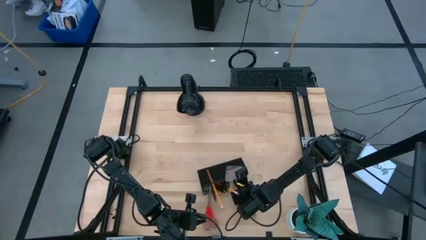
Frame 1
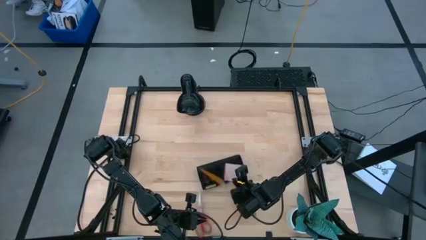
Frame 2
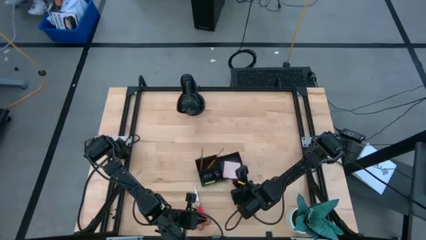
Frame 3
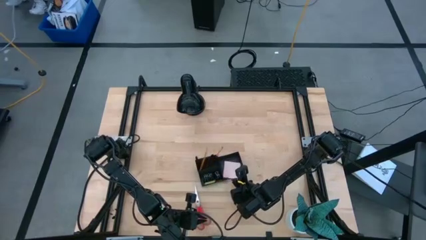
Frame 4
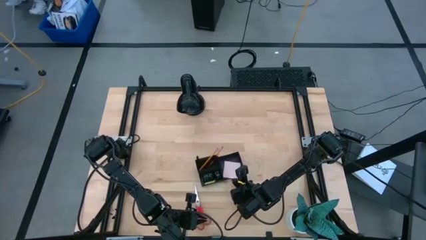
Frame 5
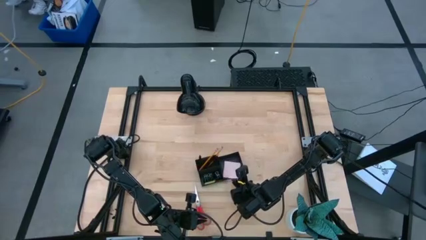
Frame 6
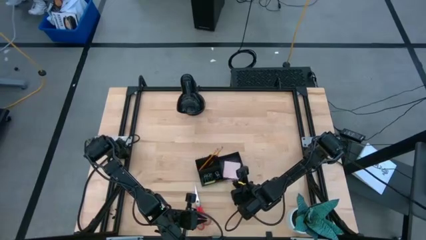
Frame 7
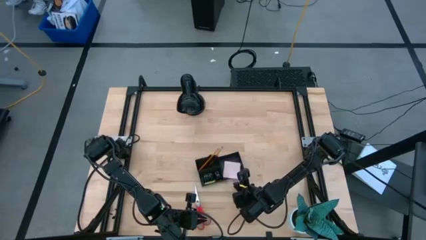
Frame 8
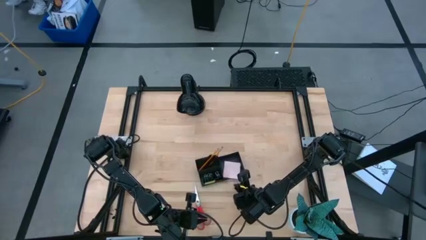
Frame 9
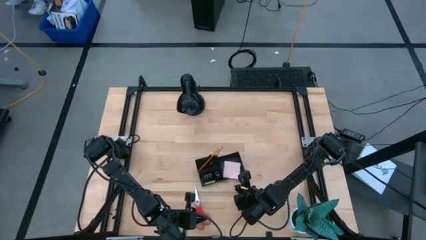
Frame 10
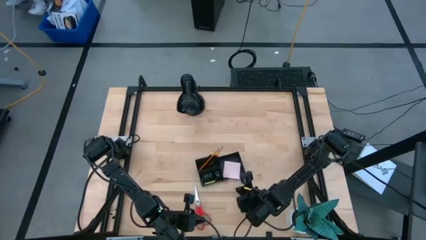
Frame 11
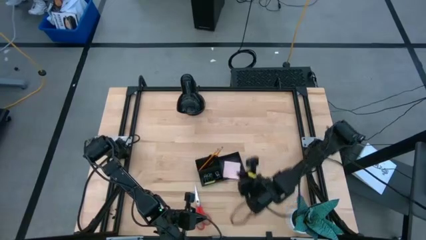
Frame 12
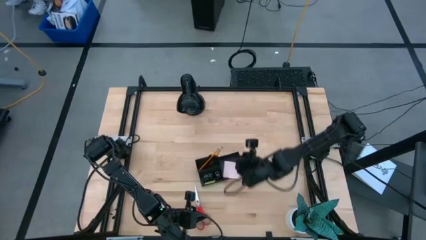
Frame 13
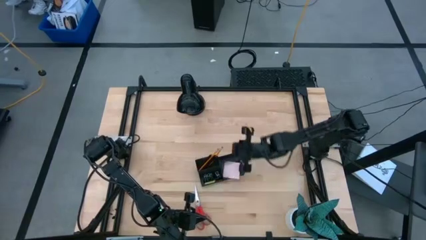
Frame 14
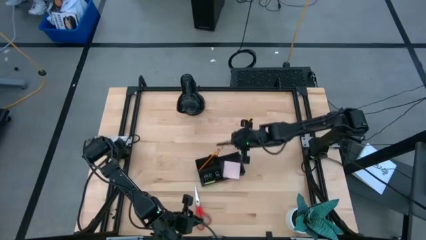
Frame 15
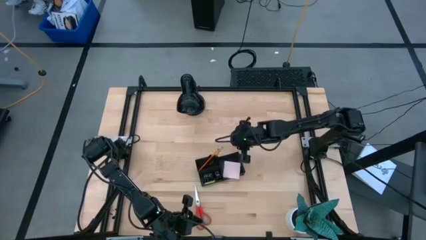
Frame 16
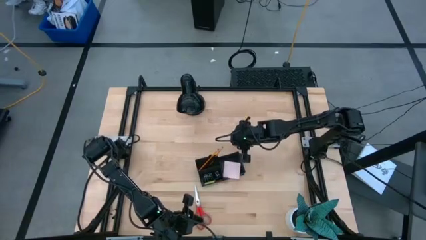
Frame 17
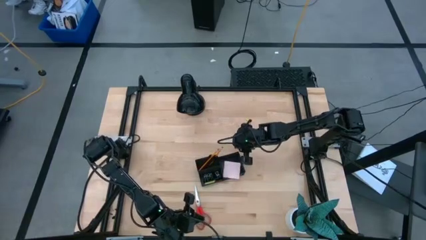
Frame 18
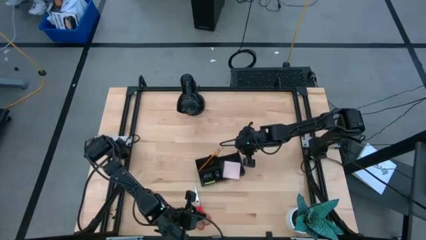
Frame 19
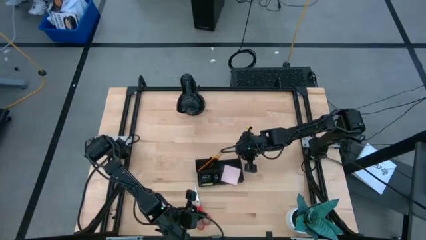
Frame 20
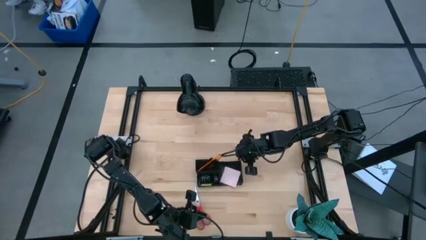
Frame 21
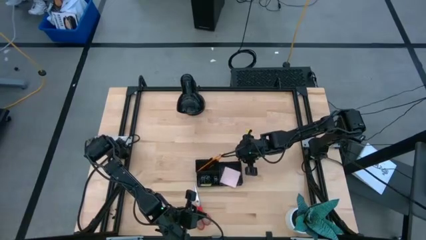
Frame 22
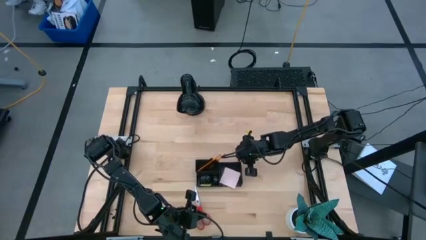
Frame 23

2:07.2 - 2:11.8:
Task: Pick and place office supplies into organizer
Adjust the desk organizer

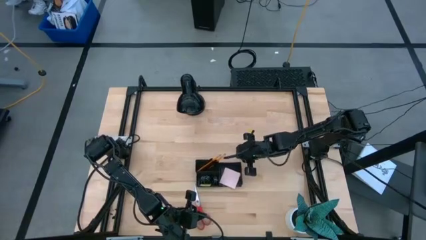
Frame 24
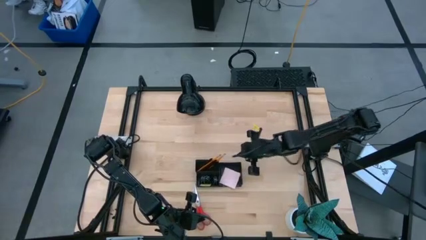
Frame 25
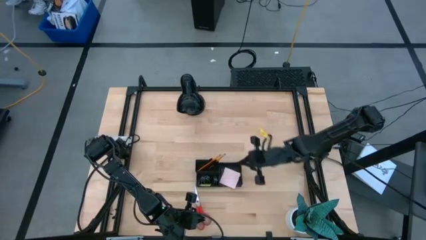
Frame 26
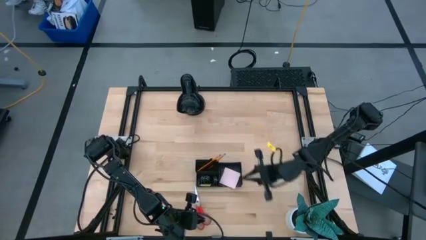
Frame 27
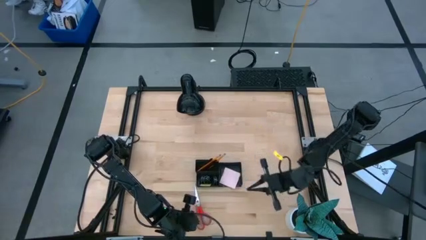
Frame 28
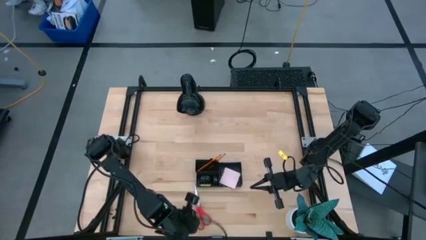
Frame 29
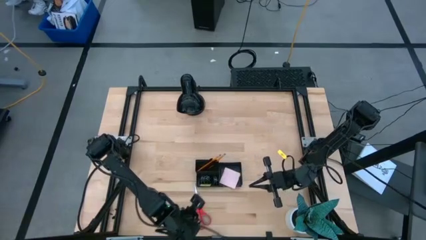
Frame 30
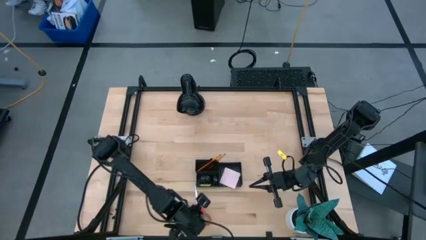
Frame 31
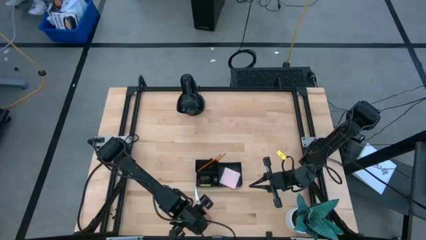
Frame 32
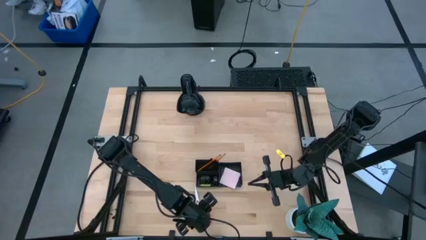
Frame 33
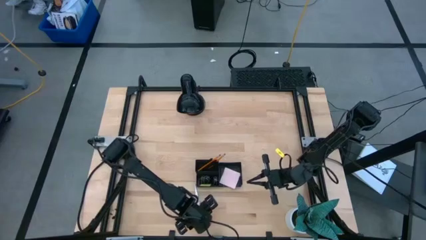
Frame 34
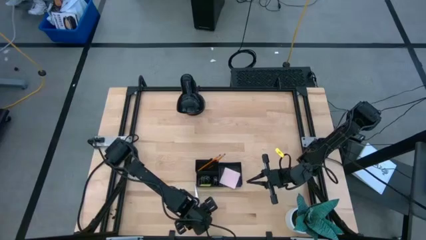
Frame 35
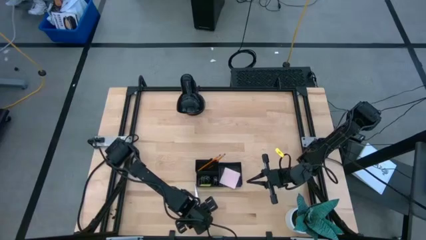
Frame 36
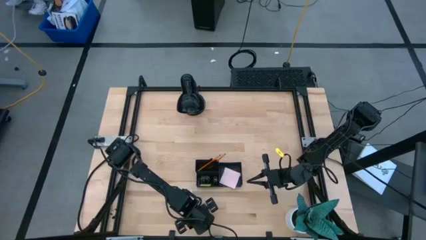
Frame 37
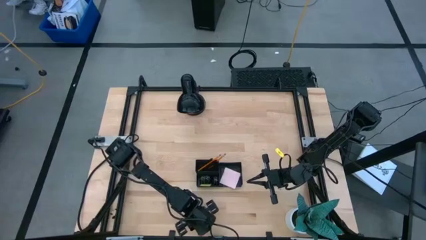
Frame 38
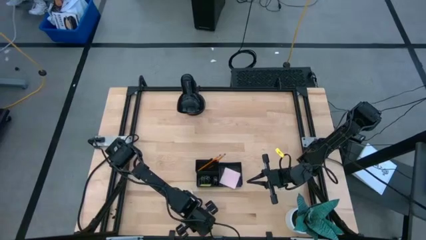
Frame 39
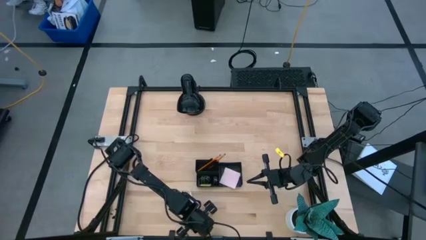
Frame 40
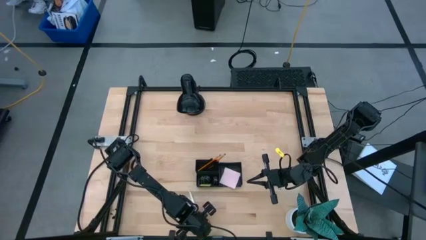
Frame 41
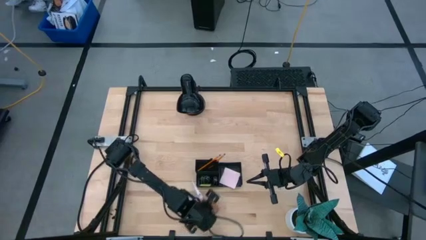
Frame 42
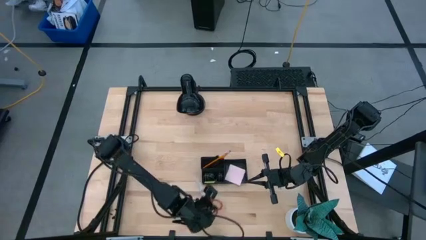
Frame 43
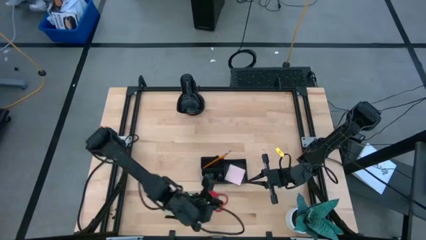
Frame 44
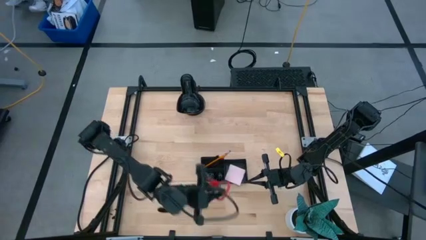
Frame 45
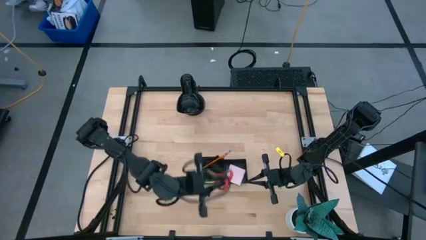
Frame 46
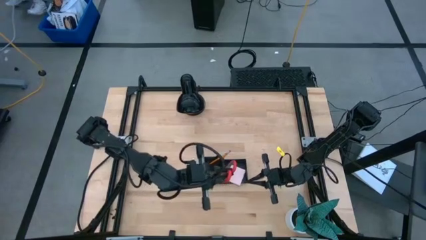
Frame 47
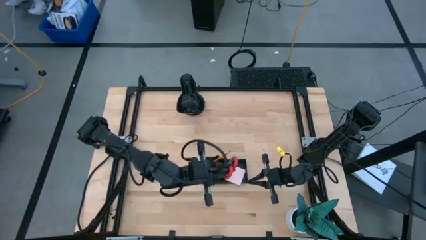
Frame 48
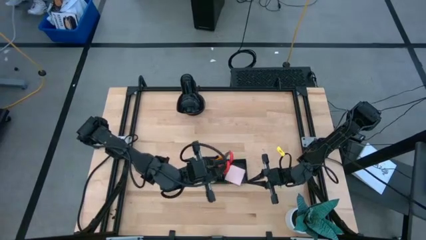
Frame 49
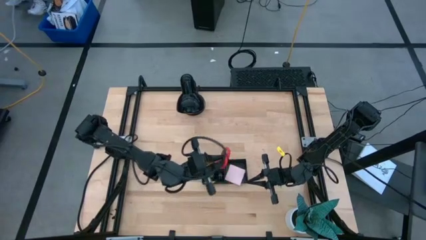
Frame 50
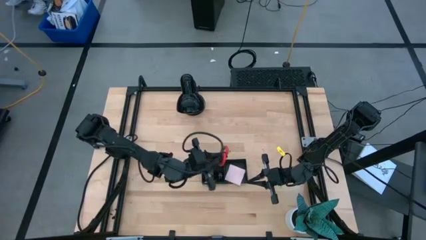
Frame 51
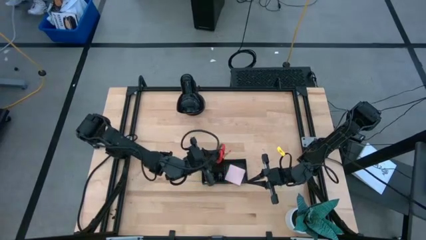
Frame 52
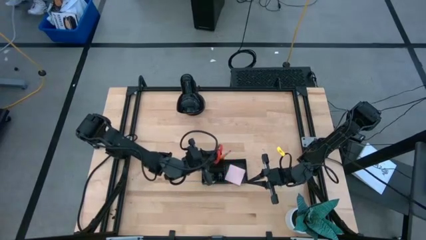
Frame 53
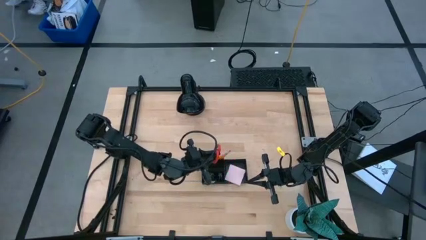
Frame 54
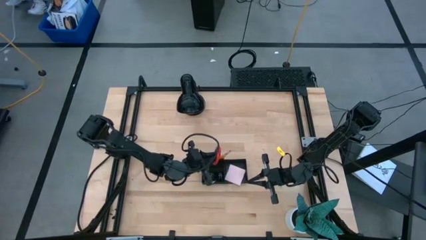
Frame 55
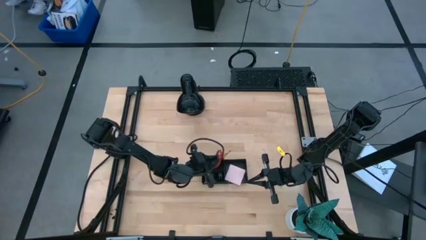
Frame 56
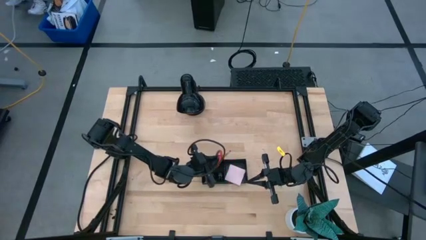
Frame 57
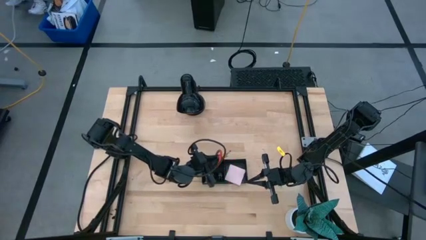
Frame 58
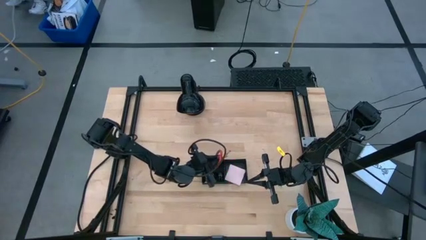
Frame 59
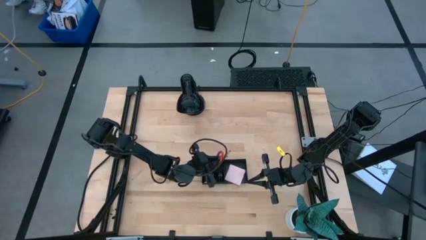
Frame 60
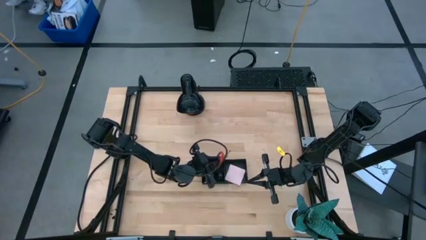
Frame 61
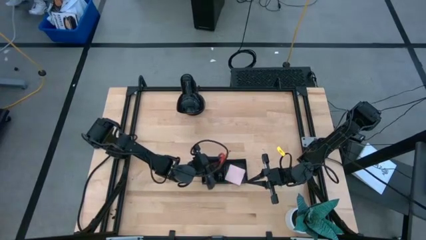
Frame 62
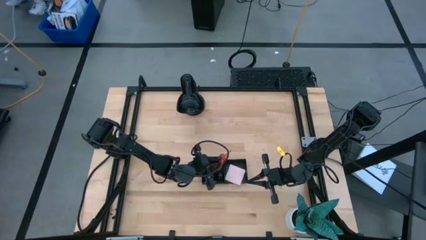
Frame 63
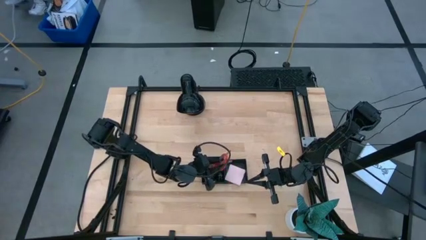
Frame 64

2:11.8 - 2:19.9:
Put the scissor into the desk organizer

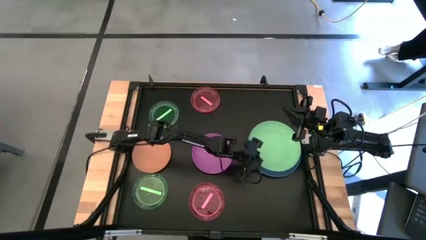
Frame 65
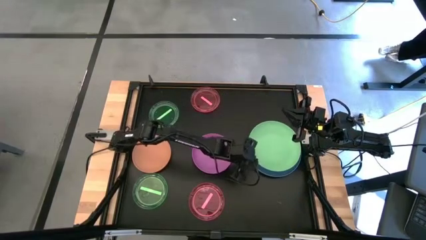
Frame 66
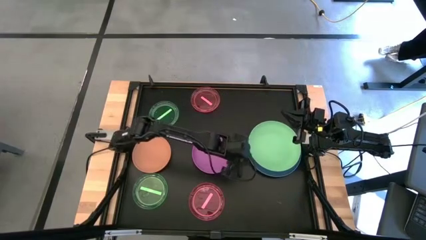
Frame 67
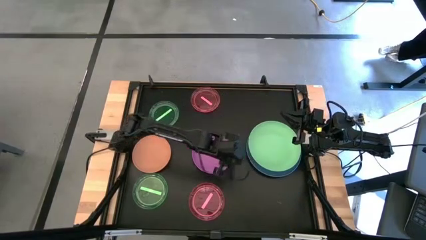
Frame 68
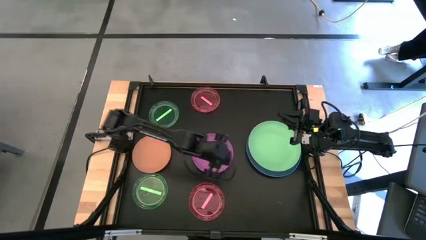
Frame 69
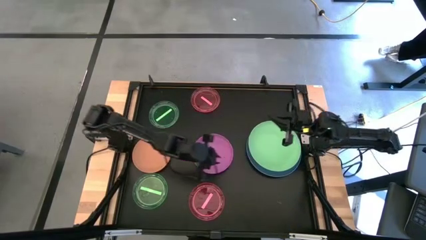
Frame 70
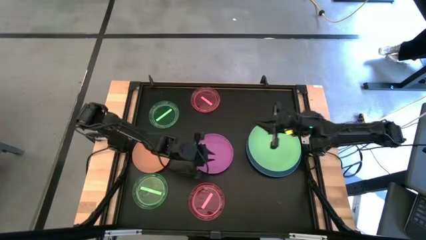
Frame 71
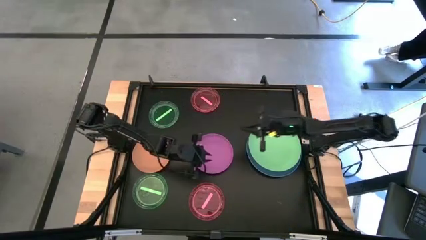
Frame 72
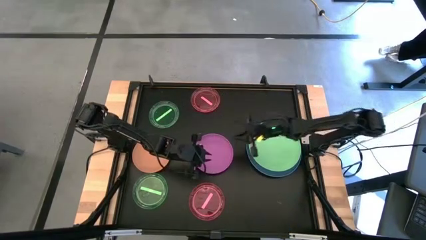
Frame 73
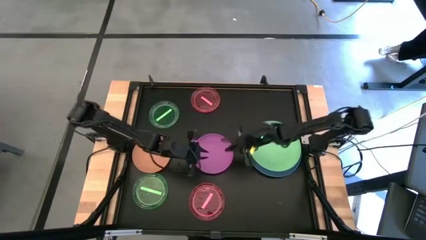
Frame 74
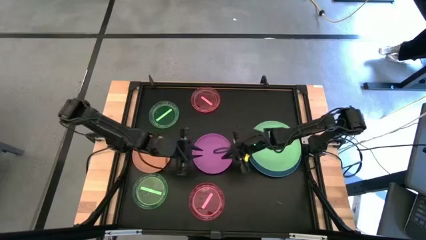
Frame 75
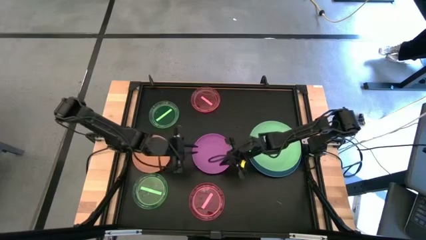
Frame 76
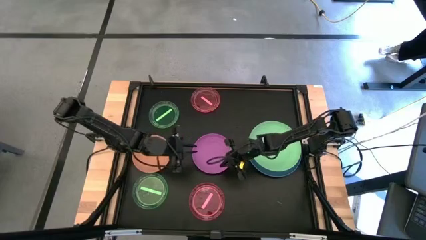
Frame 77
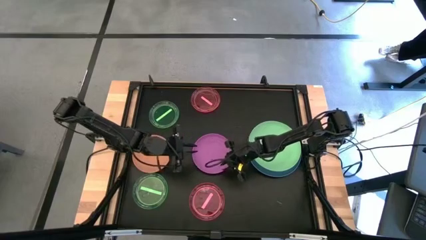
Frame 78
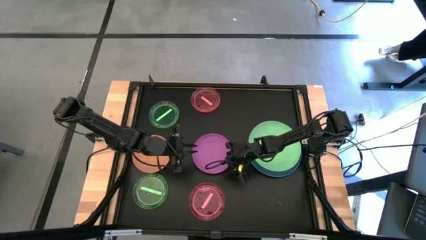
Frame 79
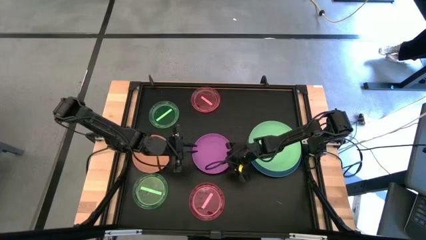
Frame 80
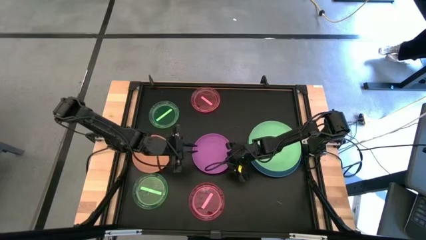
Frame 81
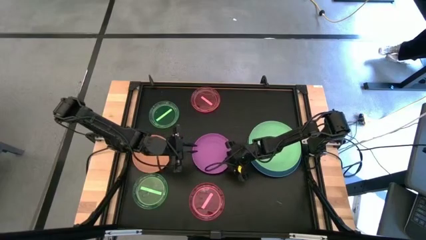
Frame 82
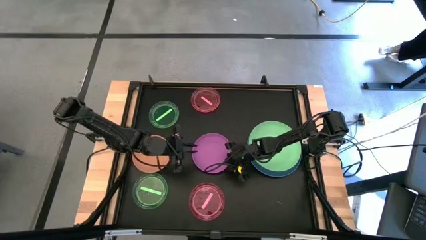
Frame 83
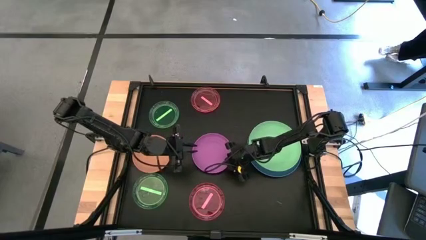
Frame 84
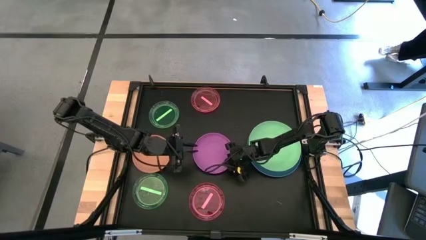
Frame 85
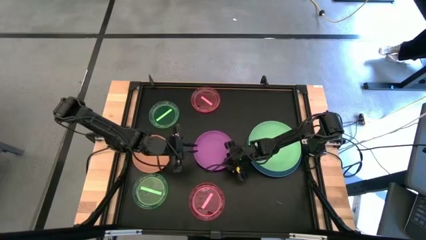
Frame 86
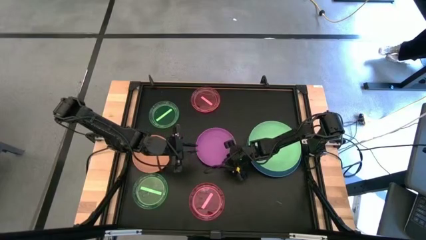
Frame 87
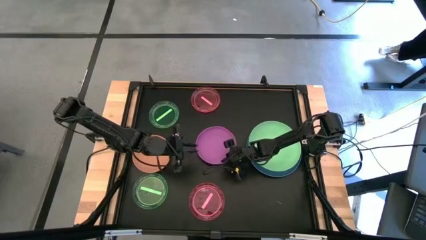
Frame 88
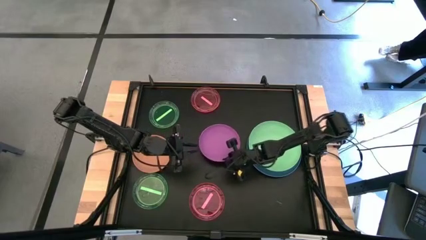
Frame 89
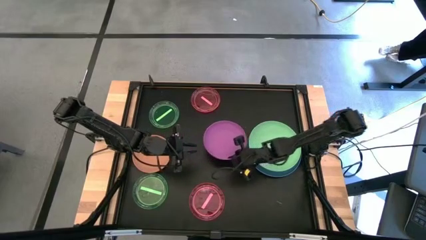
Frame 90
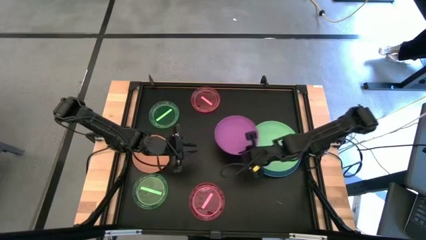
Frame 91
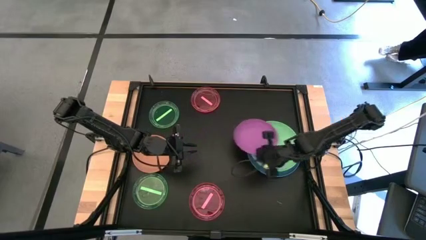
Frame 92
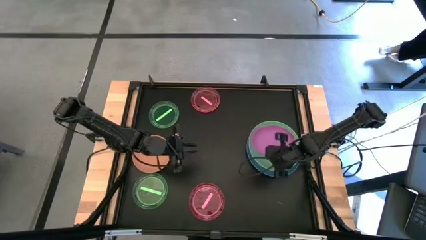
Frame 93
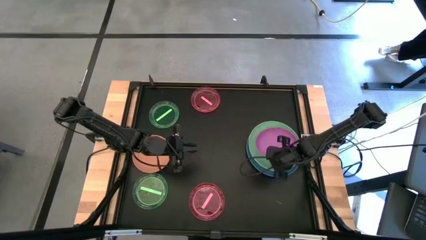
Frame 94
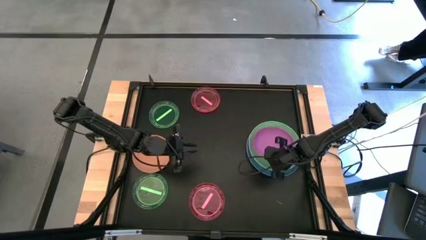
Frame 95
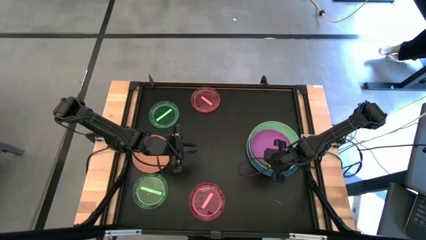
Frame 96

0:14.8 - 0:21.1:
Task: Stack plastic plates
Stack the purple plate on top of the green plate
